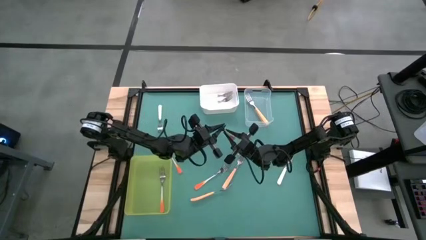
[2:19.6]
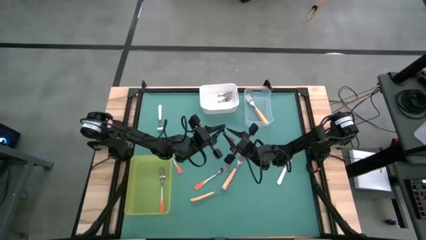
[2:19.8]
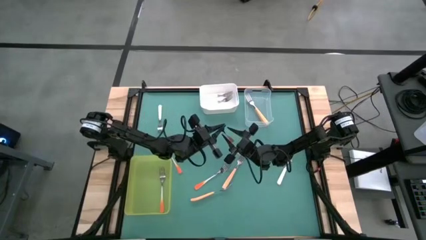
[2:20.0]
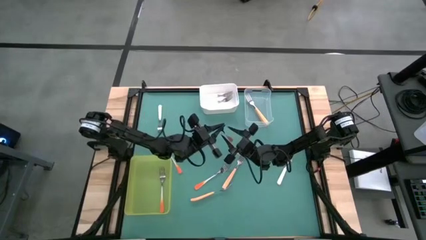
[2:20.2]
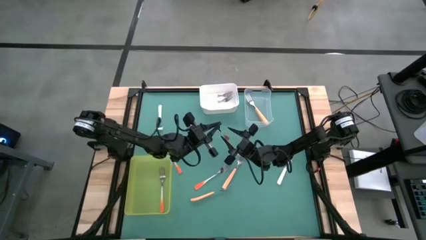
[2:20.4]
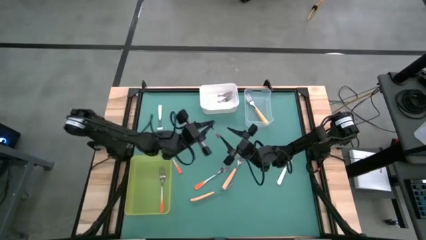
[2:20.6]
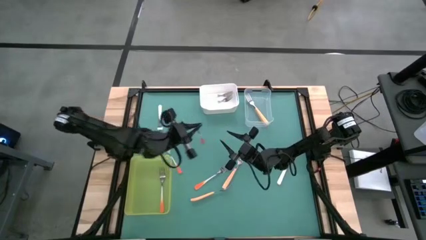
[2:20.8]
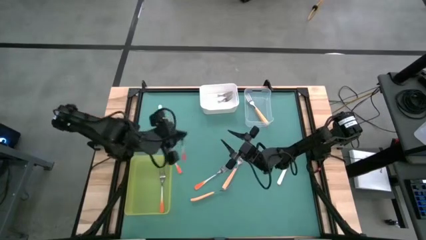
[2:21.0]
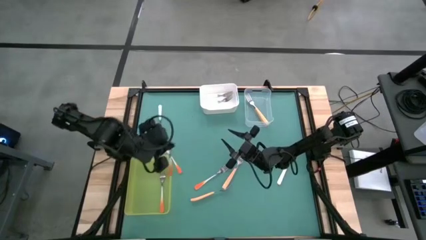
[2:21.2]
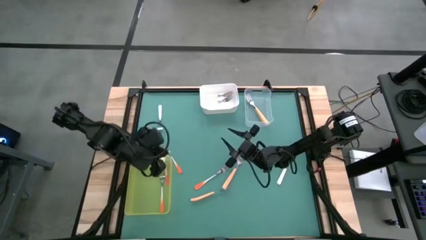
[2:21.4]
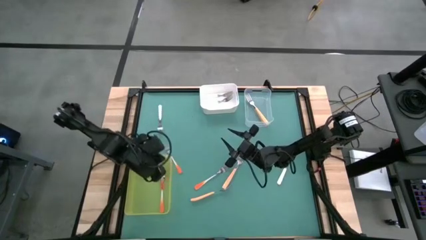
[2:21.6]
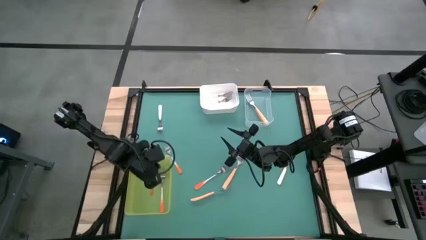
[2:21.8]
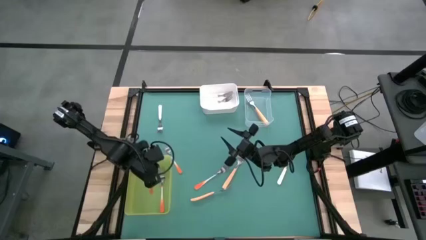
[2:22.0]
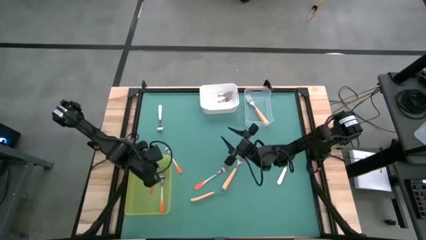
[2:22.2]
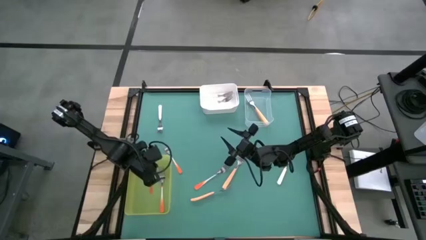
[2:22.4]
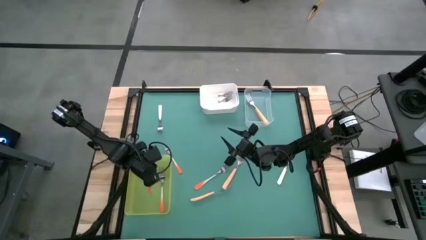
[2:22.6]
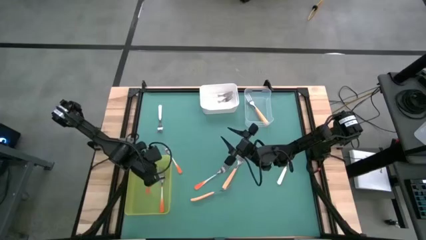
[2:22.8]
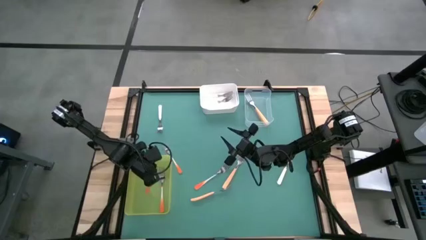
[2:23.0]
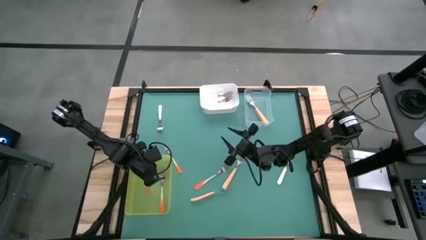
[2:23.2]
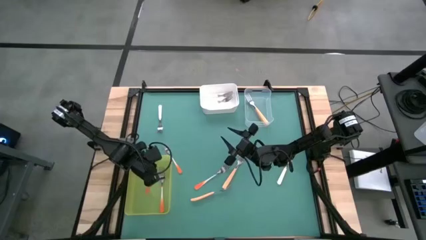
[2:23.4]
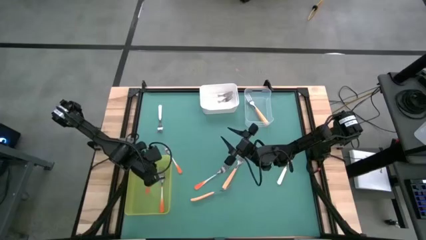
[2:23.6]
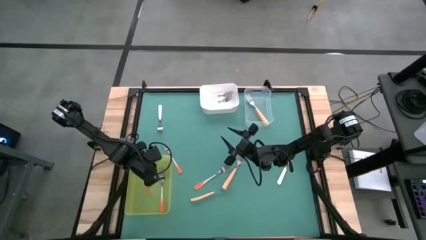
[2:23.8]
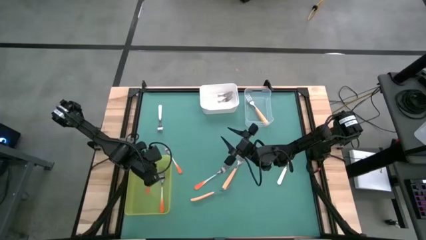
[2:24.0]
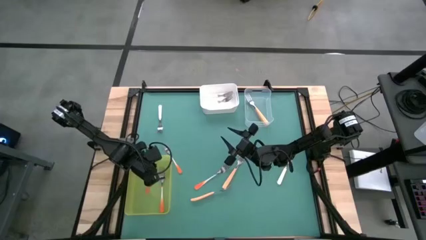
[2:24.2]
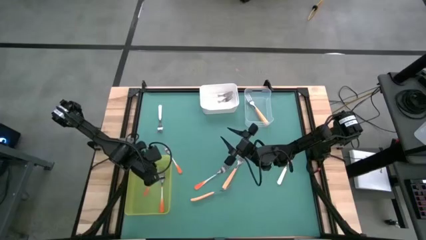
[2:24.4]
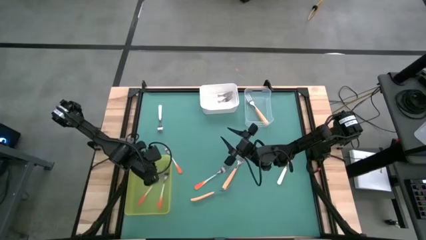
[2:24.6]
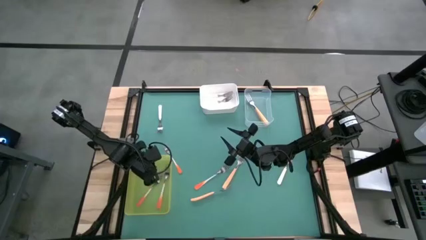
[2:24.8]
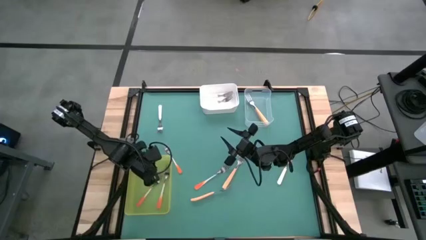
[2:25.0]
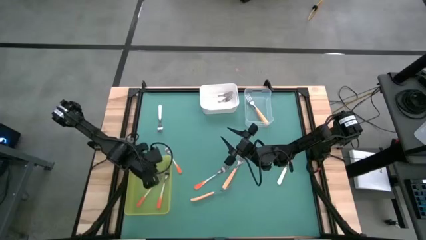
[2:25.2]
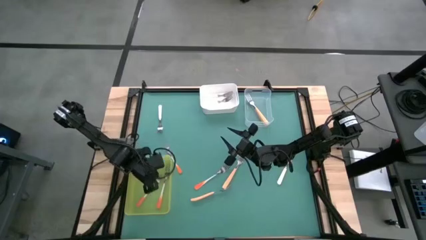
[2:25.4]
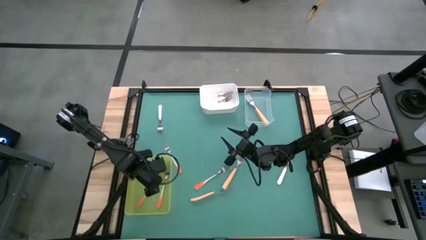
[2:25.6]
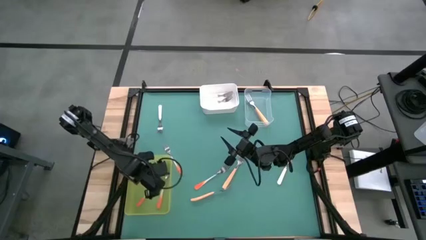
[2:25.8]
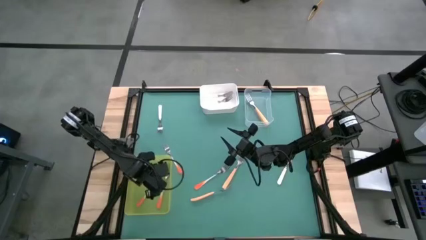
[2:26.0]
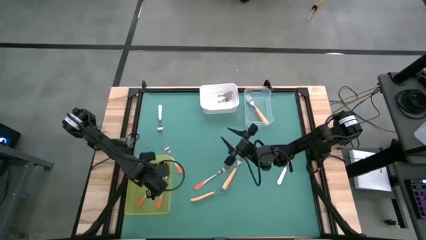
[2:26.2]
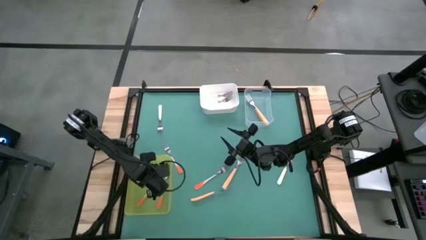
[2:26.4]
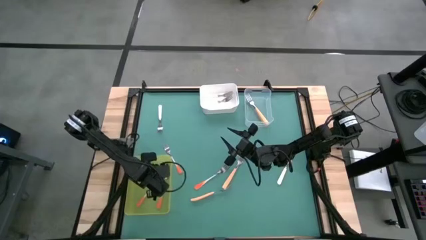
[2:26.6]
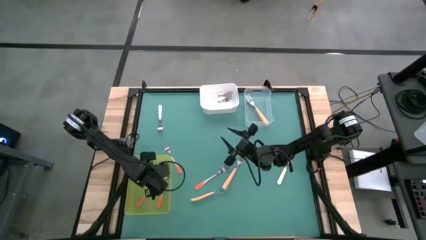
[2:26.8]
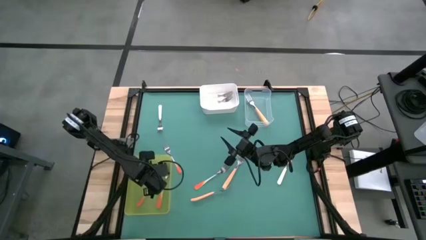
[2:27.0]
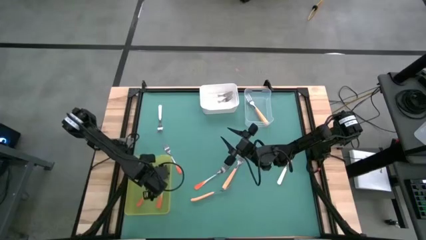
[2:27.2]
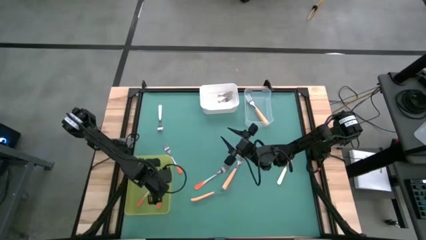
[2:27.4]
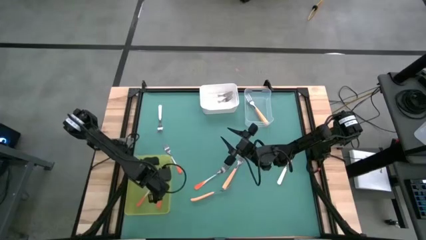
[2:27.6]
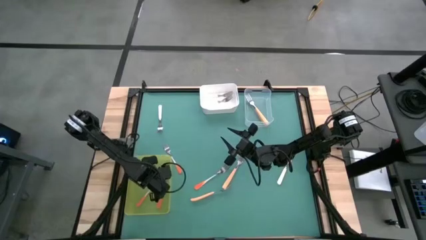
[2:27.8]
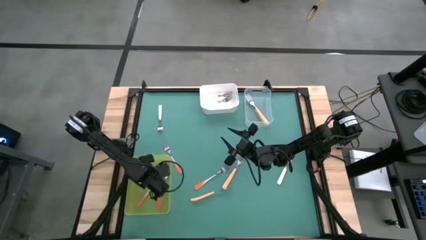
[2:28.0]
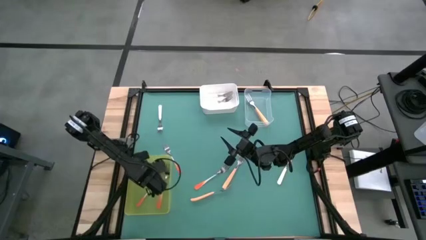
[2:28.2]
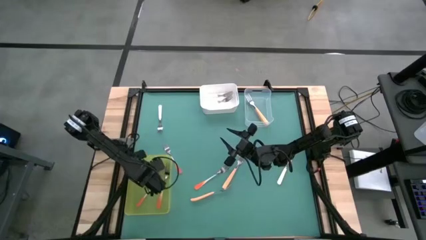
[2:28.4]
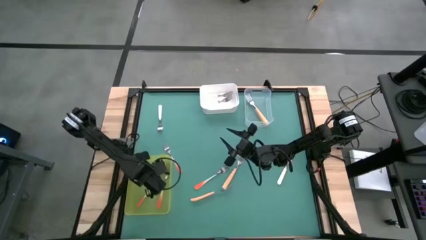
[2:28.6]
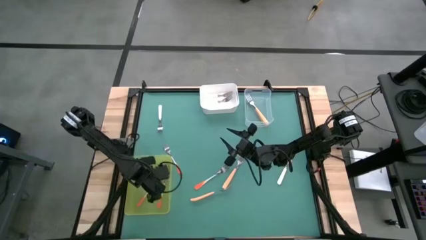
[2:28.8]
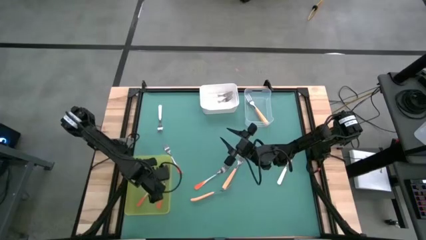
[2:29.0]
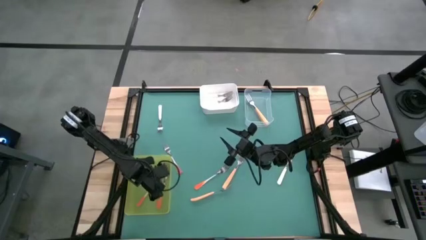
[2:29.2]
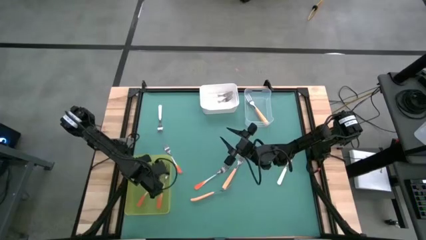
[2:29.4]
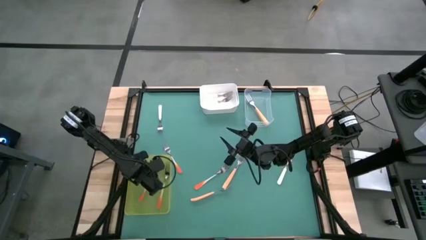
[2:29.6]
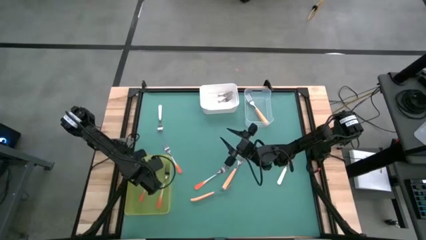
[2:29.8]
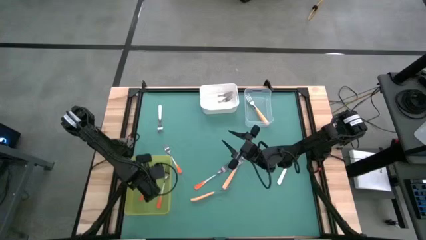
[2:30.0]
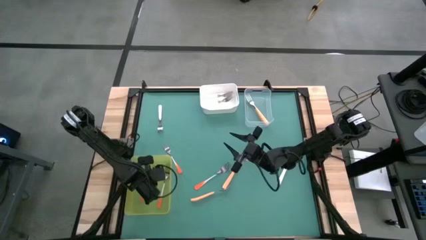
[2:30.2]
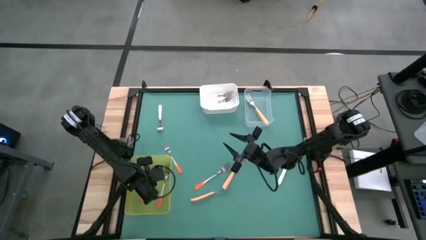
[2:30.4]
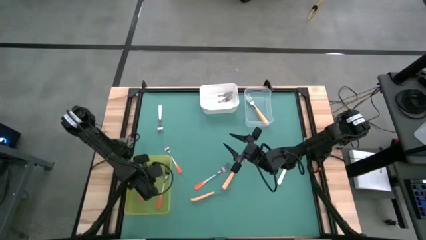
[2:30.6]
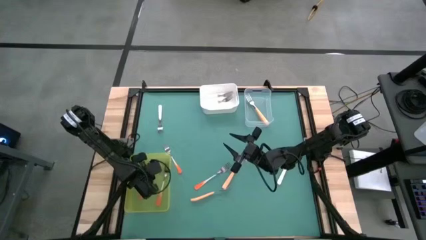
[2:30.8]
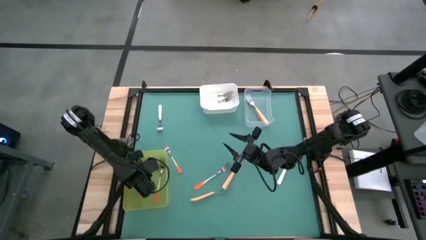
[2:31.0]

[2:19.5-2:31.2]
Task: Sort silverware by color (type)
Put the orange fork into the yellow bin

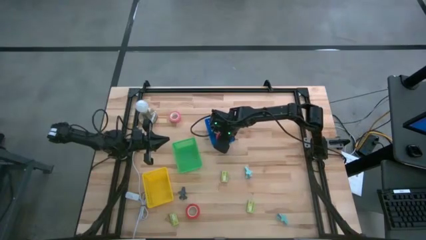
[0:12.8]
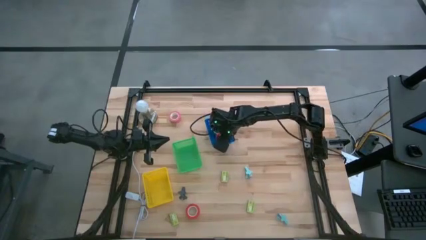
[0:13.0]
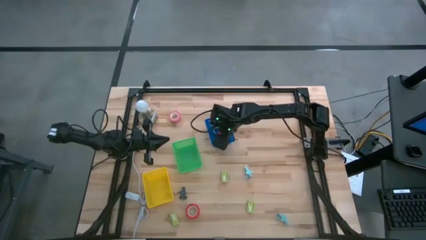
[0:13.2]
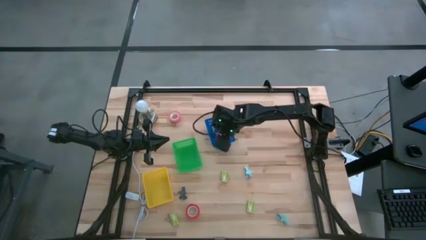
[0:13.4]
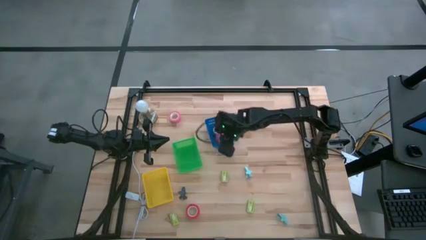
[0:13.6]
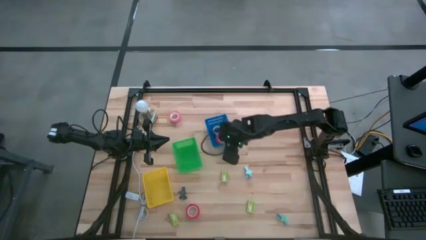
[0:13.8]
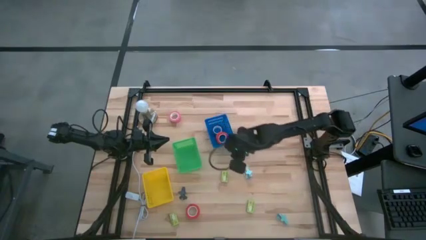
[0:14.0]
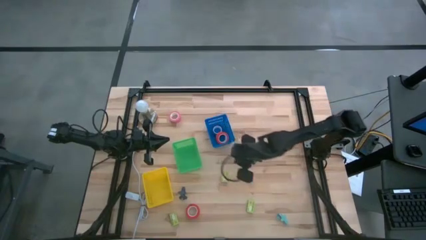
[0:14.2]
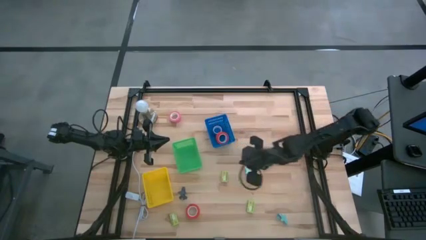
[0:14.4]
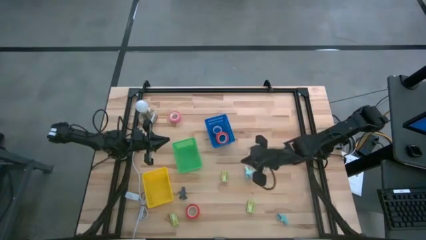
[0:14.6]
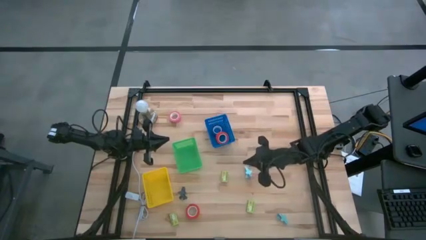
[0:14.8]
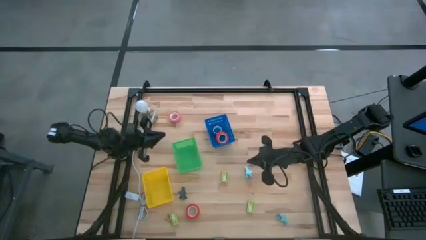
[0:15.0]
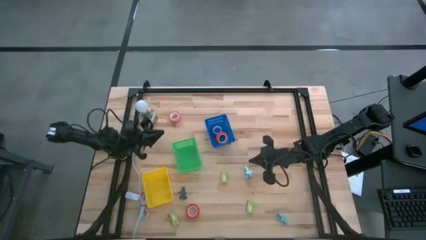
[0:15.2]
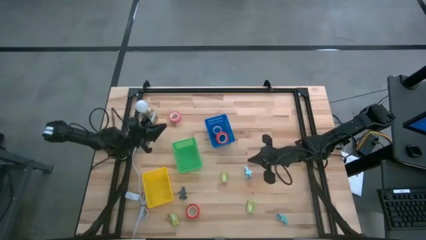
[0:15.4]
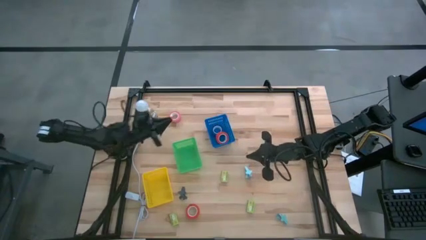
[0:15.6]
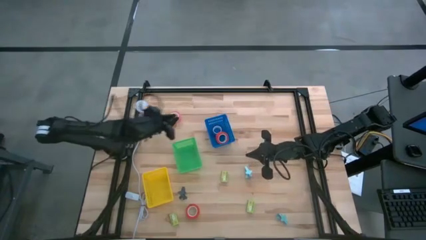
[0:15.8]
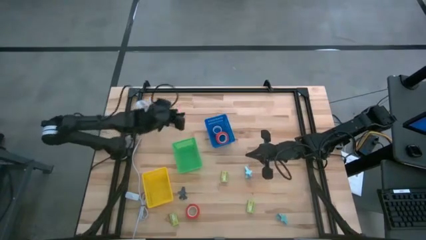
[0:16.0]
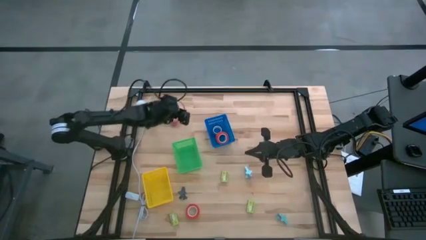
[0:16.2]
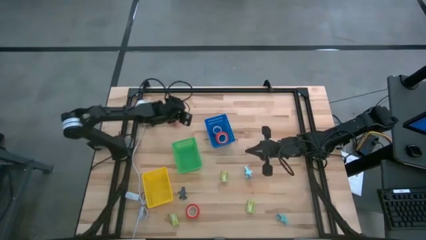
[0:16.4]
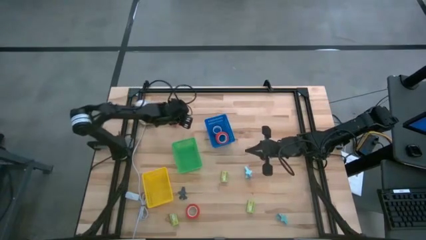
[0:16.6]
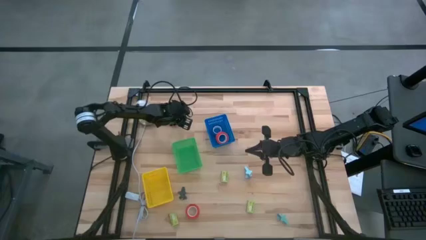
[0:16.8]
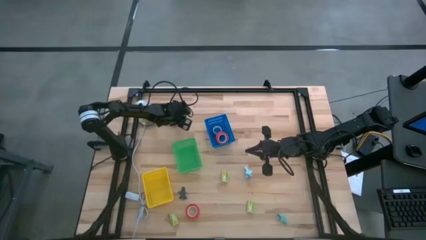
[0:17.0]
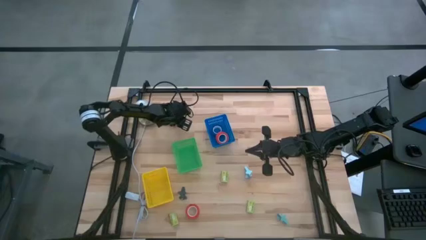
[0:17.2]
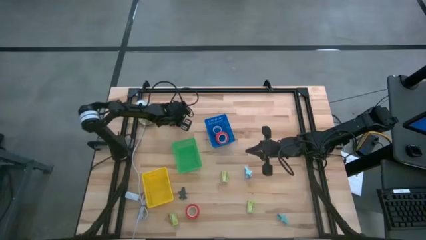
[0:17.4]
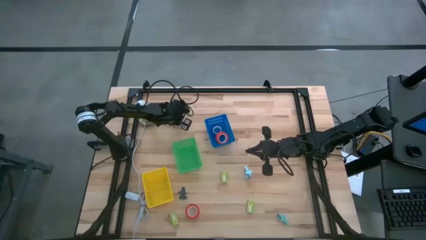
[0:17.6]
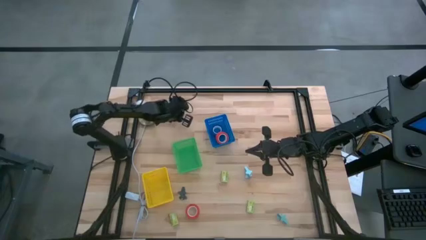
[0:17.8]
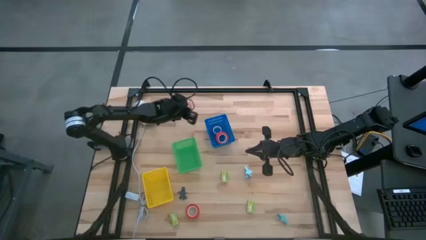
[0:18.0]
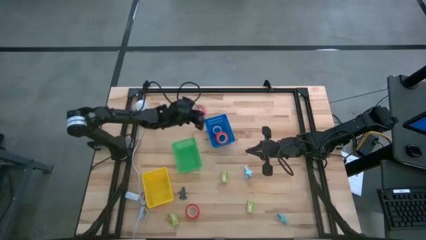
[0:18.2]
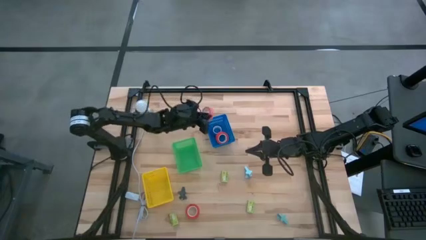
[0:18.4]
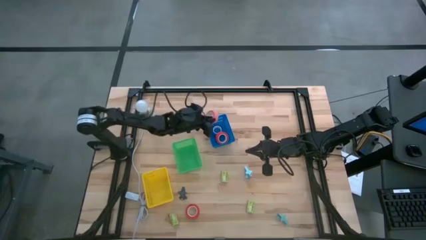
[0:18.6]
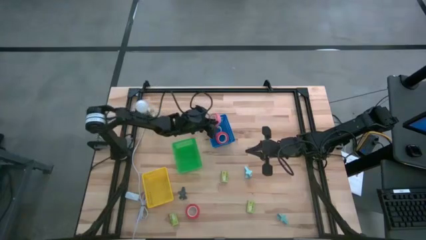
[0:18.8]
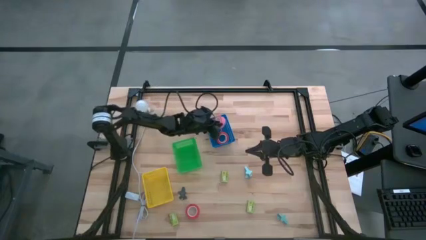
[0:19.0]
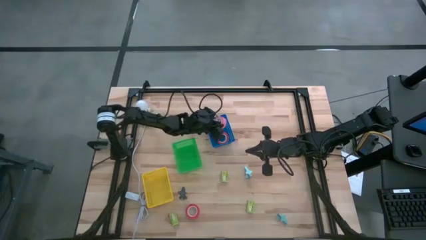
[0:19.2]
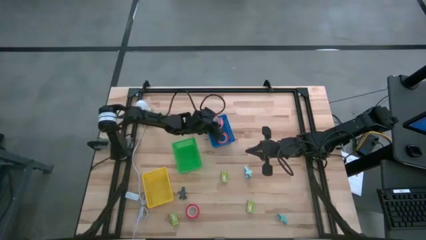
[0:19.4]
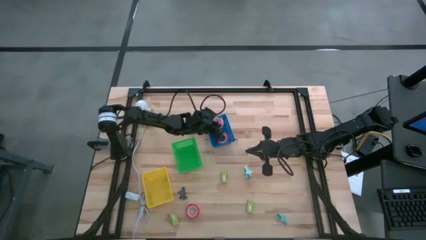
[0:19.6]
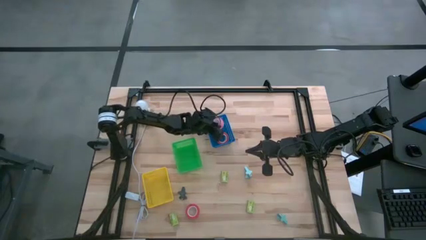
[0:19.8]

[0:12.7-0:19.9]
Task: Pick and place Stapler, Stapler remover, tape
Put the pink tape into the blue basket
